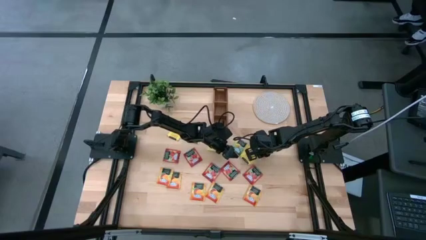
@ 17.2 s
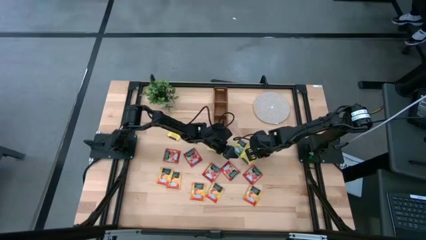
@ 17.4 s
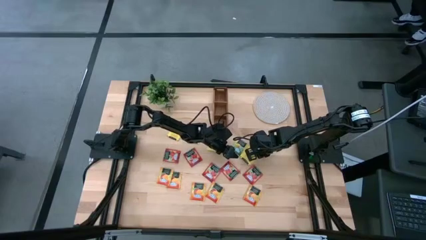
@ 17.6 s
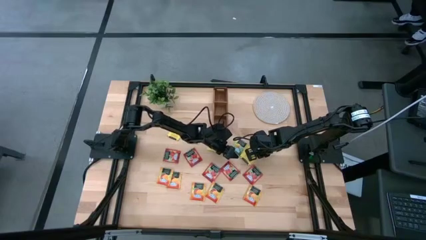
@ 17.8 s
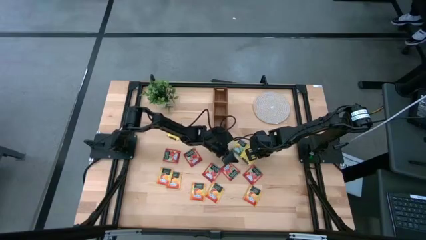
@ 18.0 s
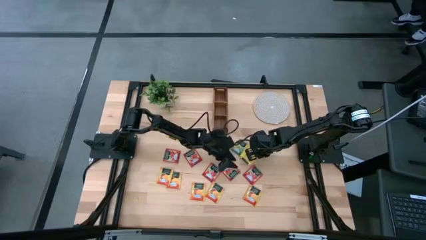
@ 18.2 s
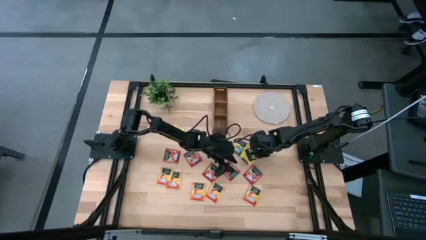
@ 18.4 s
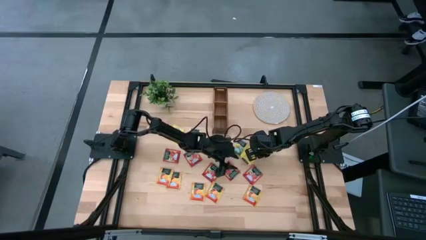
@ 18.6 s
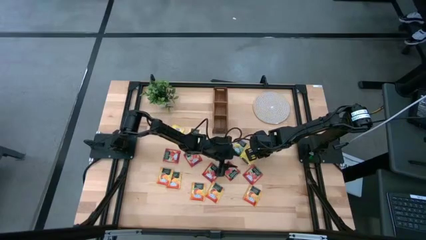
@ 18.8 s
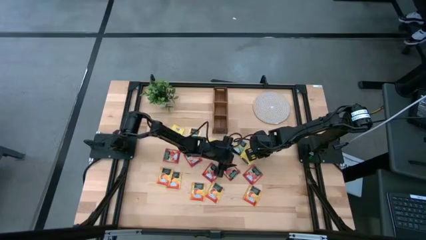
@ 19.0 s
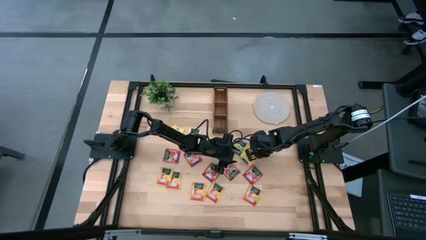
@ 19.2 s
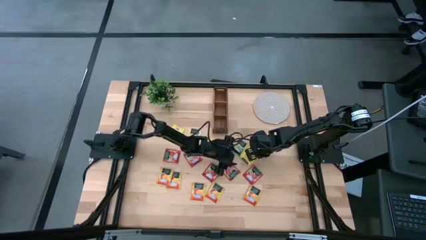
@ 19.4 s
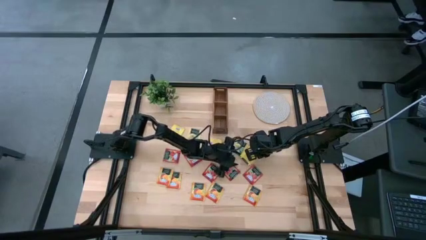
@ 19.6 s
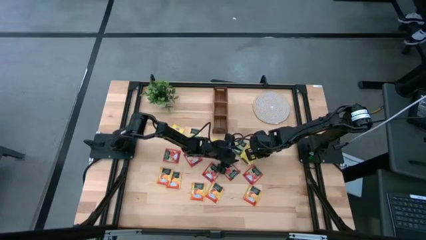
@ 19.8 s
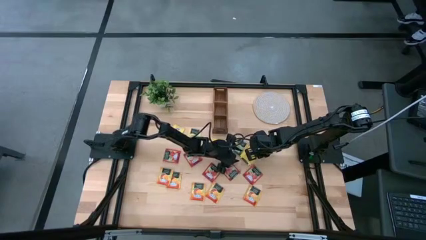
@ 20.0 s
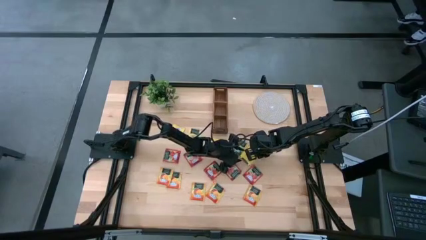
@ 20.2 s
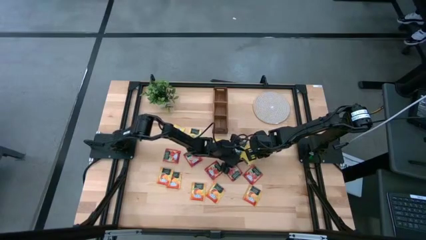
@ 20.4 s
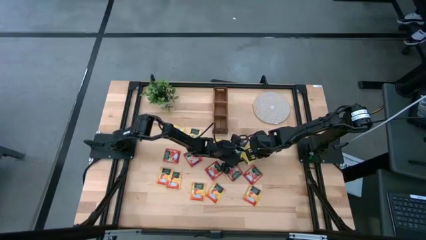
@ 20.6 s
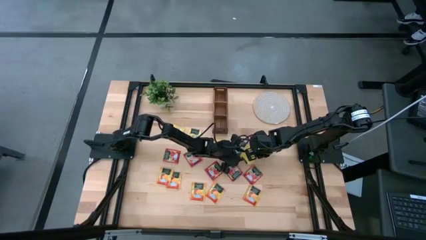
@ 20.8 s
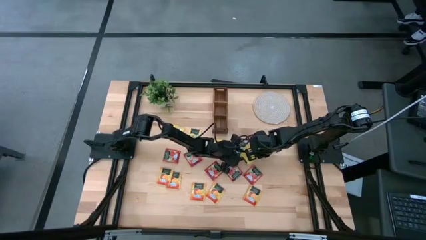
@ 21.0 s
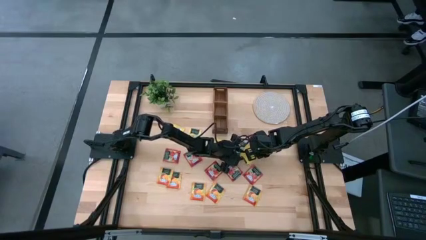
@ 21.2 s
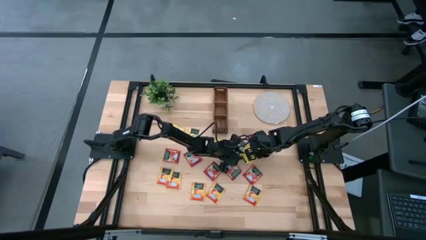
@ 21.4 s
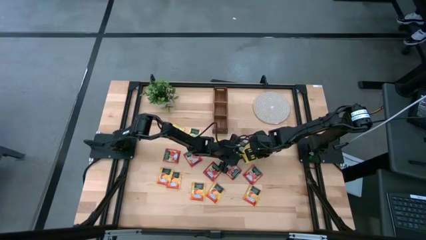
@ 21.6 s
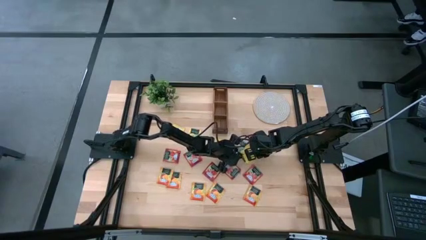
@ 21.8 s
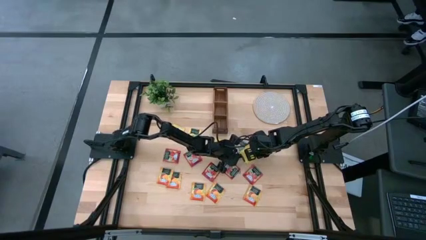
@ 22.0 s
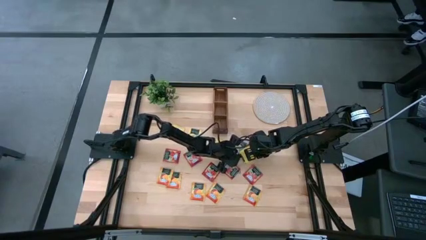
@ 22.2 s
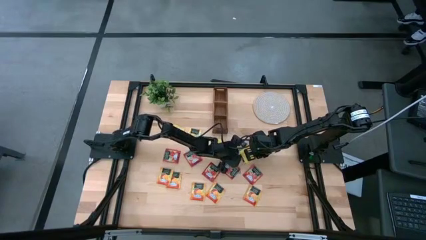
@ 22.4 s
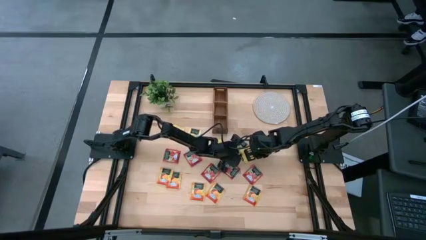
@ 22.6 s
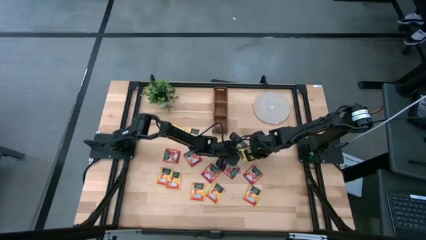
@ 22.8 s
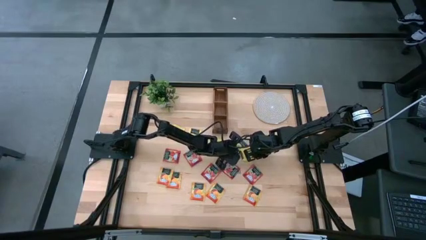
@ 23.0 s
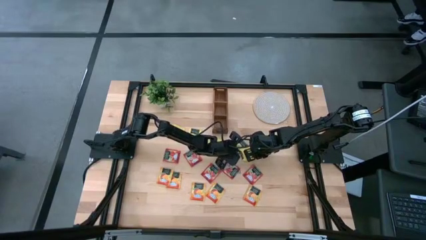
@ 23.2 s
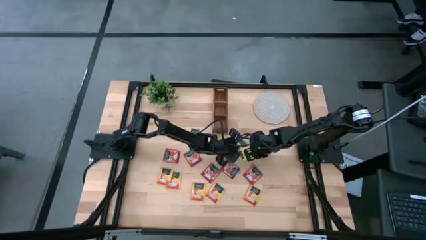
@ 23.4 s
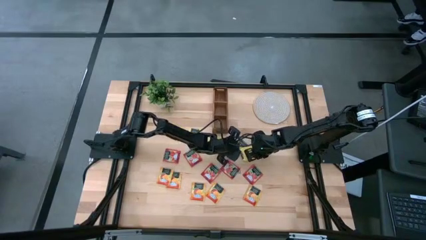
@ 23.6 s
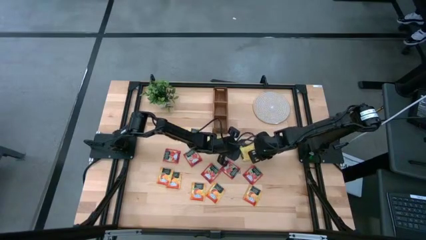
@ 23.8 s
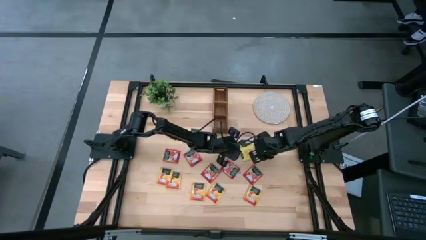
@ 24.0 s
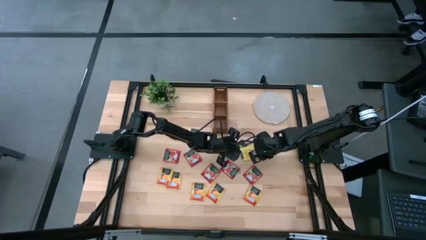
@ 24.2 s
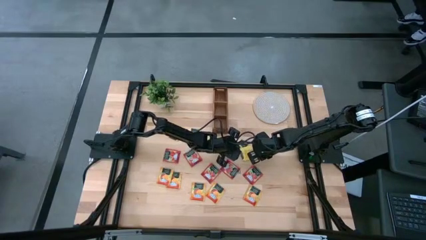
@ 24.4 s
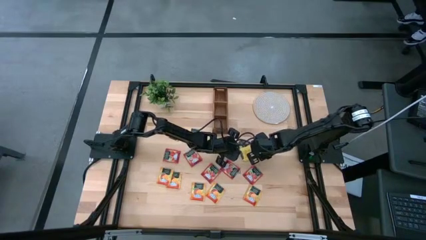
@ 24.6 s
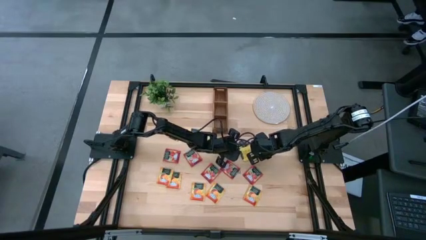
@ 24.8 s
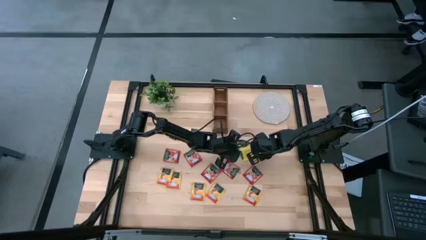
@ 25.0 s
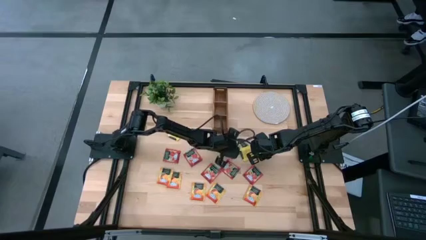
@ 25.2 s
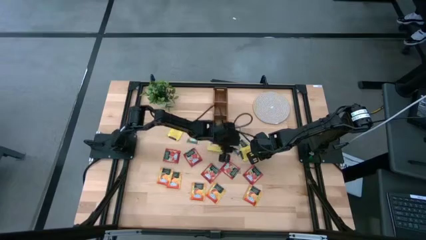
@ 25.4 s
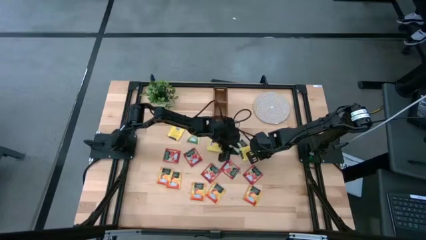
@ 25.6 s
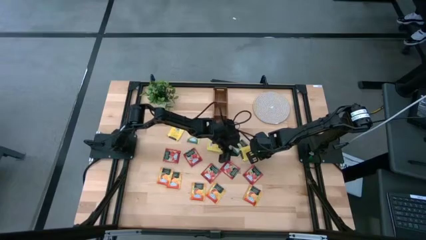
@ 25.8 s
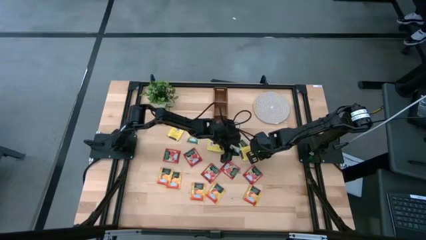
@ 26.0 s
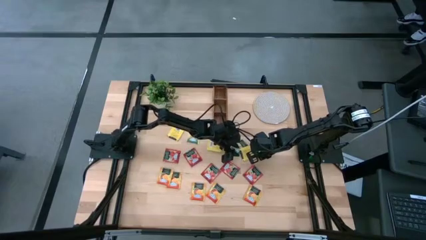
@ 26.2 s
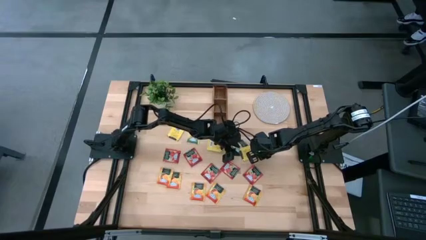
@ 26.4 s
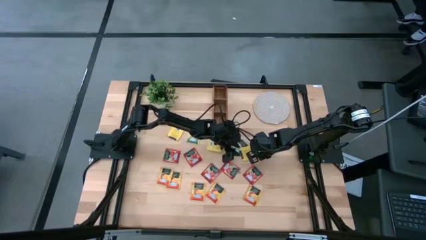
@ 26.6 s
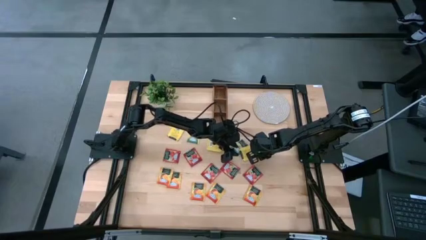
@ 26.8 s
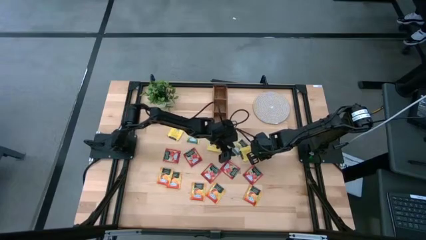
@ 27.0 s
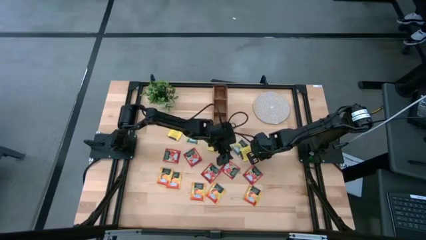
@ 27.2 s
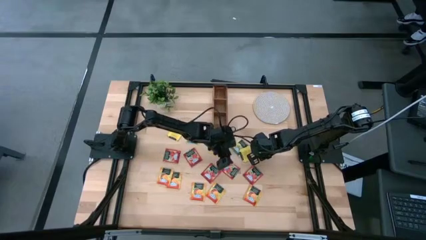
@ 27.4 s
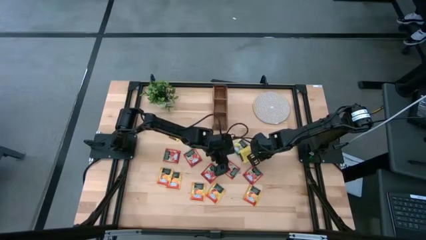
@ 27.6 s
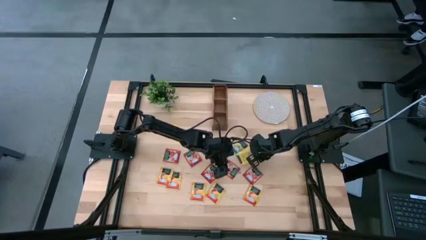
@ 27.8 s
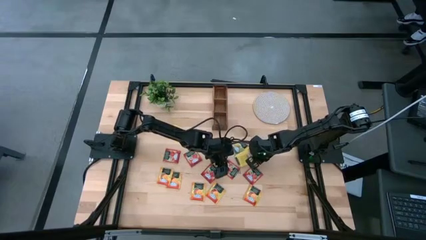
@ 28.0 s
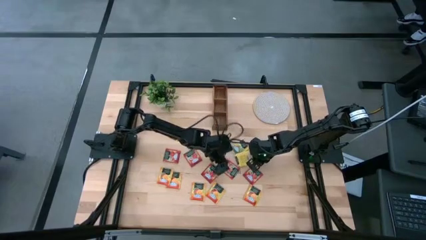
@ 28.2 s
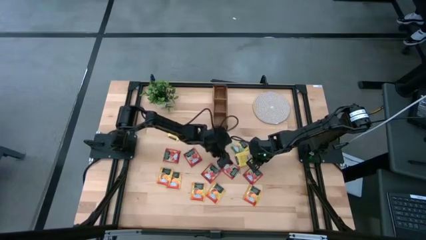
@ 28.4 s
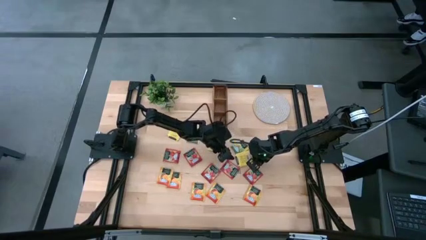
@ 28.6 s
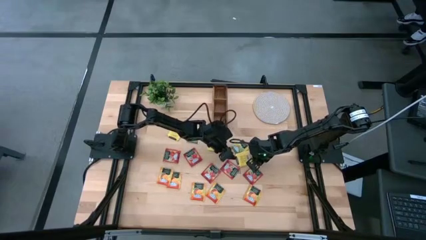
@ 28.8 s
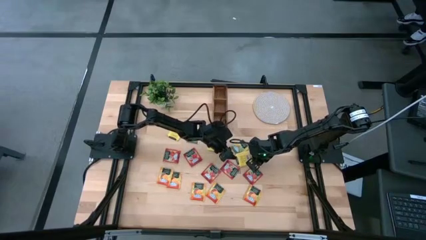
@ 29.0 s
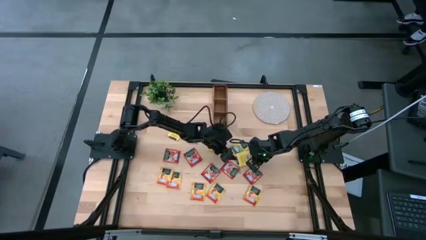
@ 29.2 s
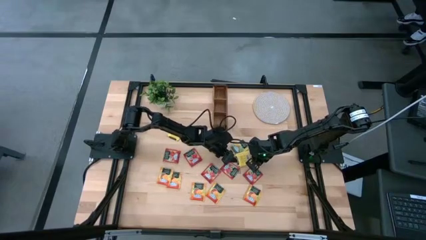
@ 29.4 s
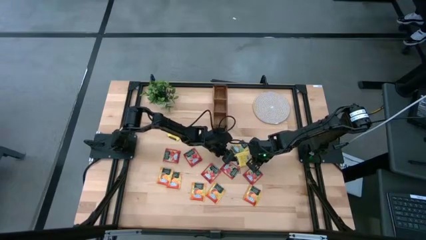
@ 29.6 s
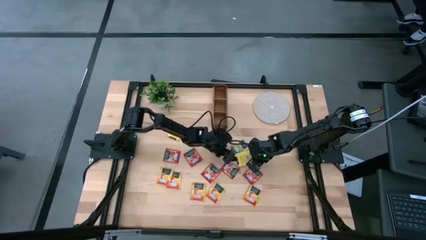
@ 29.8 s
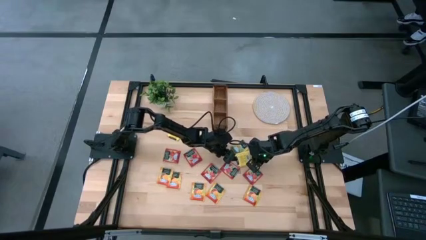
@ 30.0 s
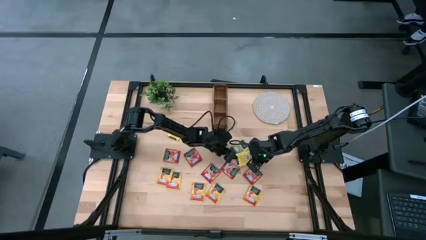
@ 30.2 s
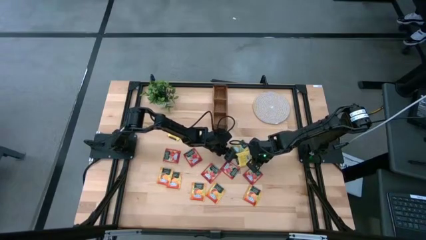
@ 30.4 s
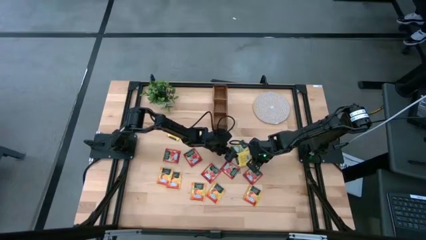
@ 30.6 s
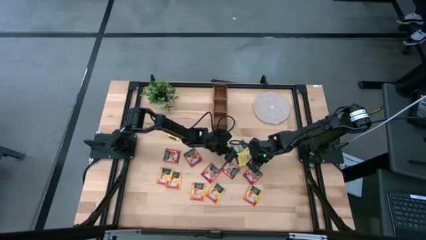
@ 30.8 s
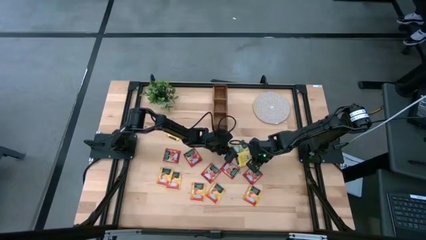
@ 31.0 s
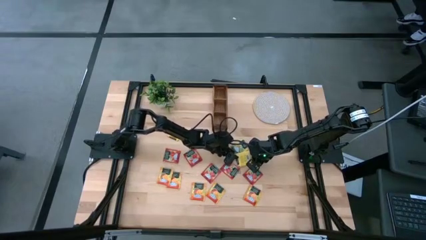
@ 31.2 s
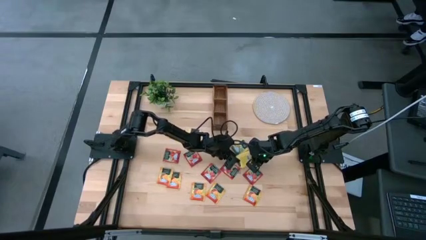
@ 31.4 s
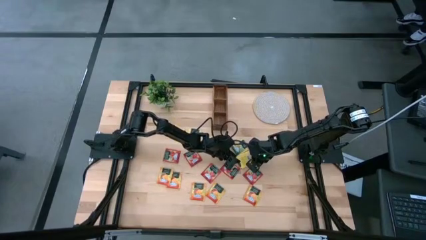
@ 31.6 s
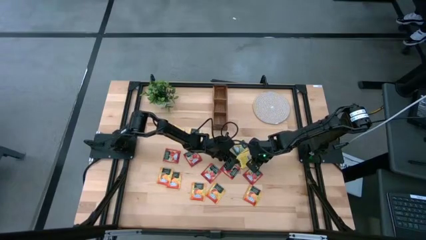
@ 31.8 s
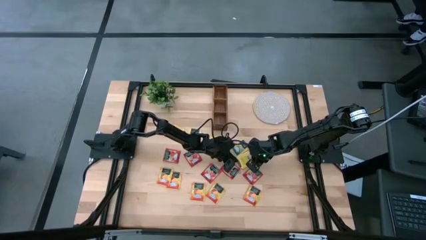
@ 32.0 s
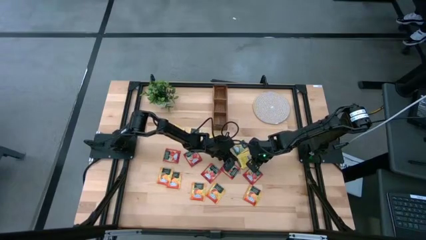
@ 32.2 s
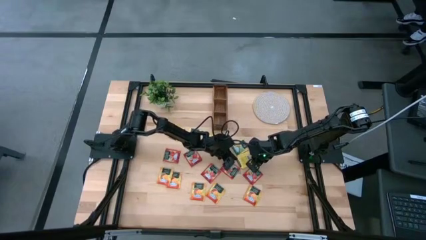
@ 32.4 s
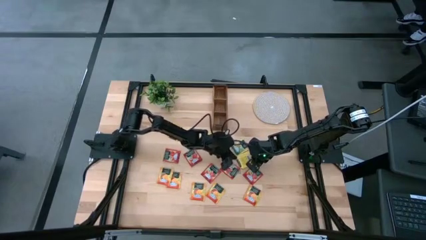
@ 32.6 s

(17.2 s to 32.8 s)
Task: Pick & Place Tea
Put the yellow tea bag into the left section of the wooden organizer

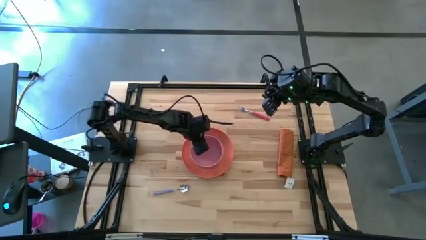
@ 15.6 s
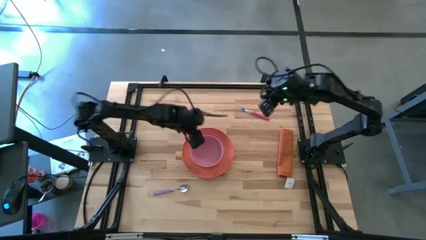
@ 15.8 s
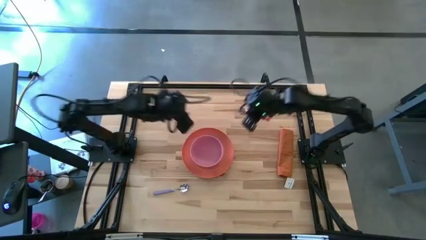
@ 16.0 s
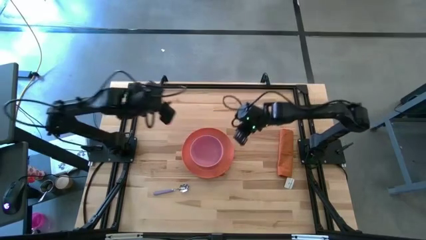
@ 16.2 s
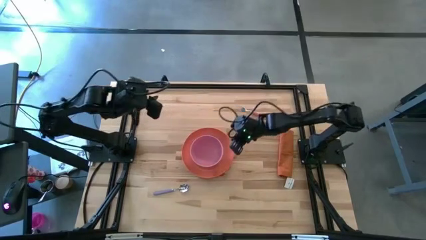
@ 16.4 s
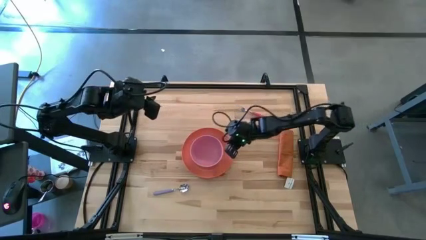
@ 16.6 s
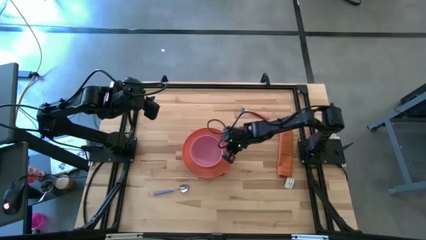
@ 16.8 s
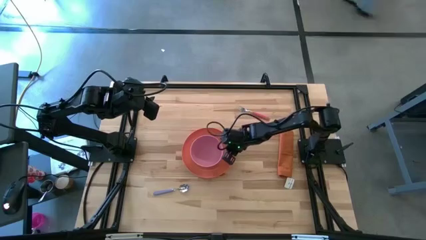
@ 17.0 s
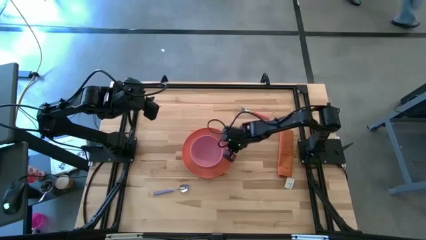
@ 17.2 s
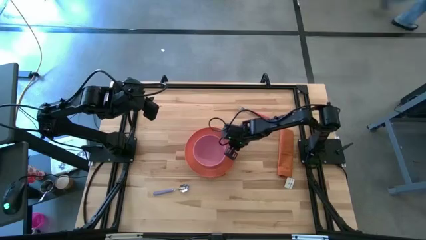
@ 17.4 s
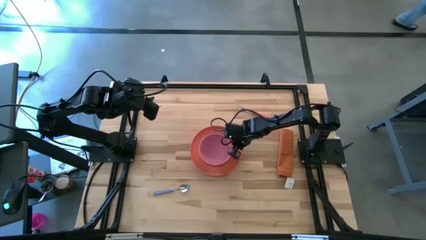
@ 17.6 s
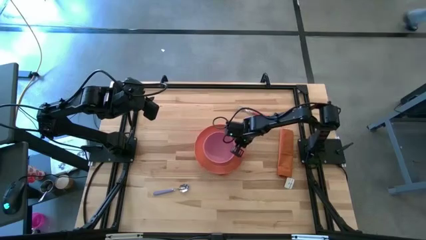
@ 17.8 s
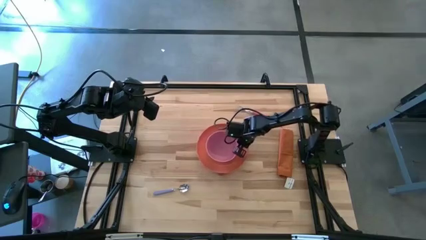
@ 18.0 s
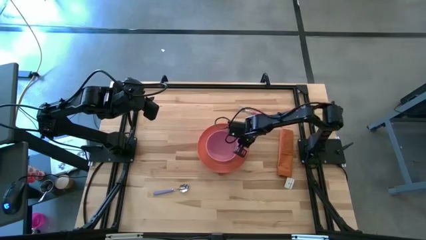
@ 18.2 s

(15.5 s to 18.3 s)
Task: Set table place
Adjust the plate
